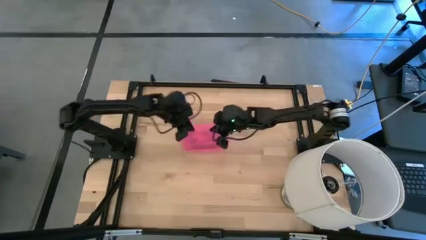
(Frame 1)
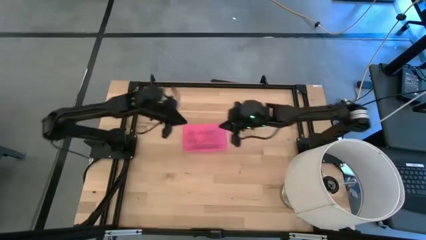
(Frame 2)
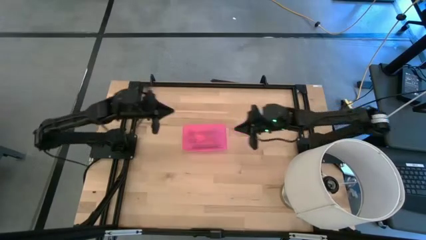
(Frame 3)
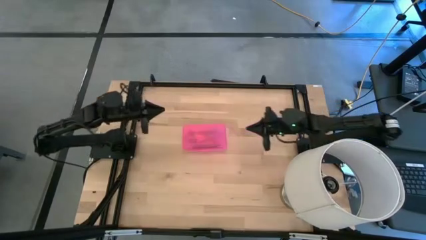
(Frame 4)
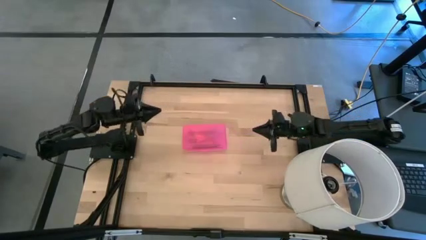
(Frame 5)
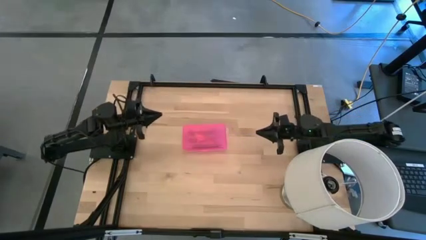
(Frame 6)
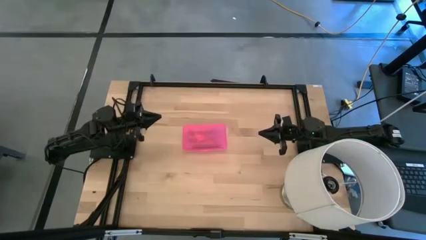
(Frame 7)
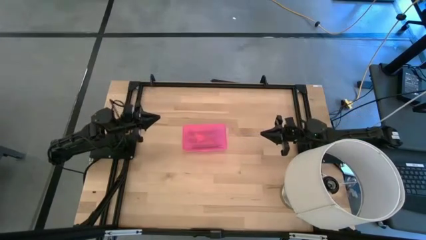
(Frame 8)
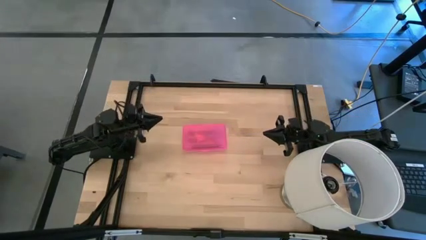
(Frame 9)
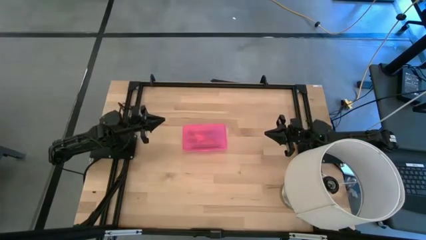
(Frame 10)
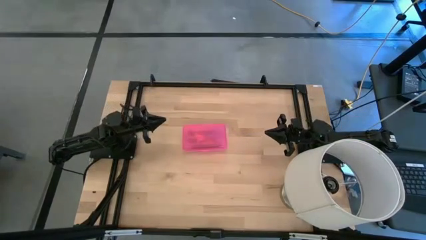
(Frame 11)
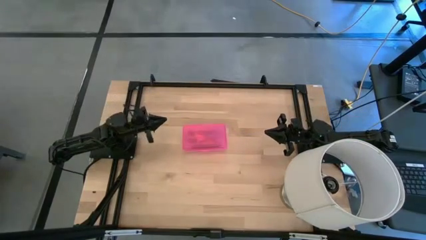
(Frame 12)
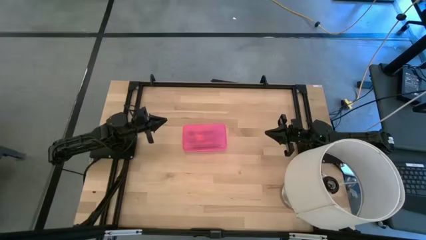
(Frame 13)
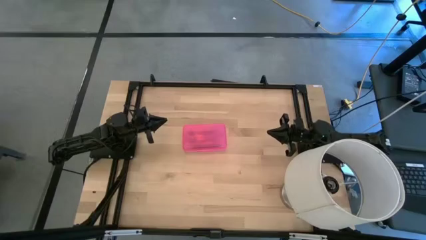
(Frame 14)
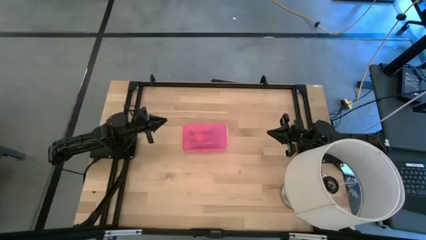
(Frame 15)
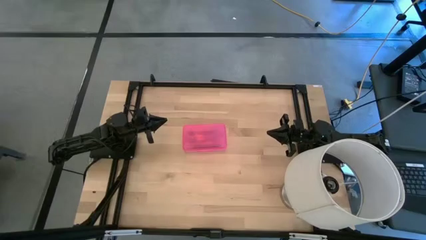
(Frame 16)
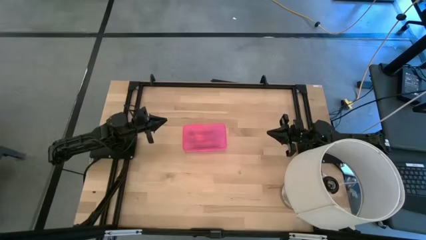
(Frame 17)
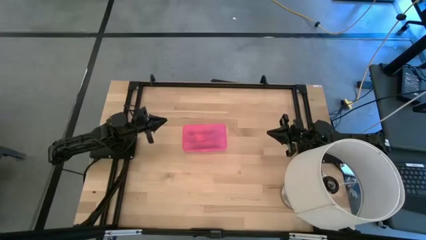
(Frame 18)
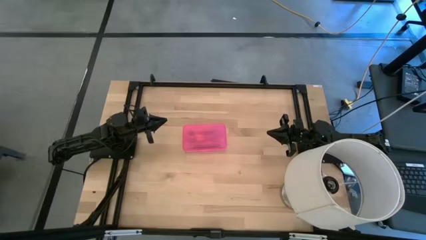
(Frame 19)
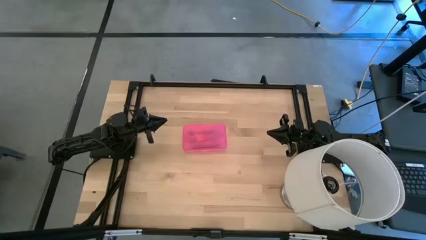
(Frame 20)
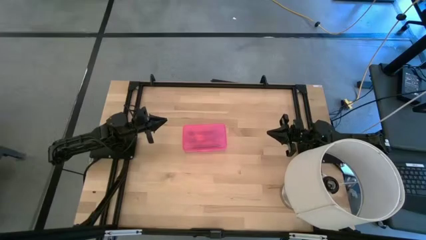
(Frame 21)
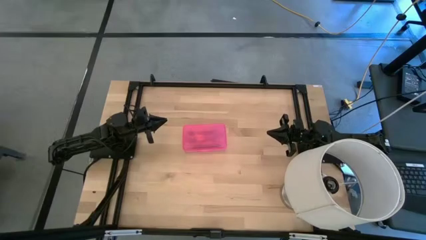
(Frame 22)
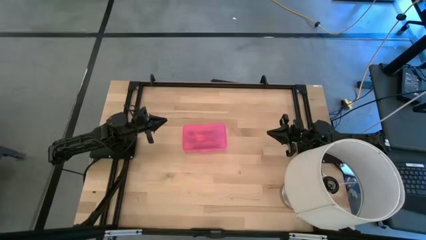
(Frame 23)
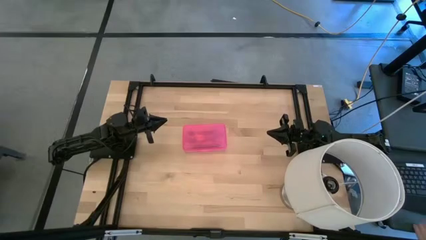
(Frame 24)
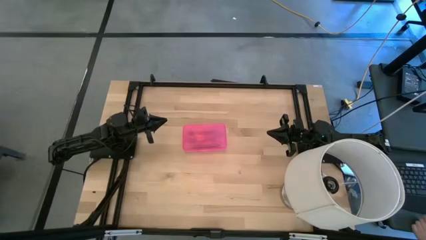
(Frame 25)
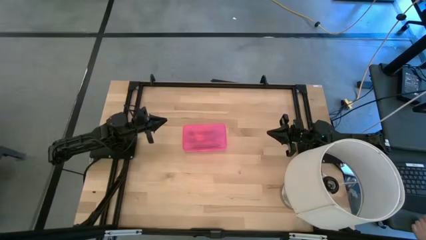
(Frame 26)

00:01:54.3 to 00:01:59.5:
Task: Pick & place school supplies into a supply box
Return to Home Position

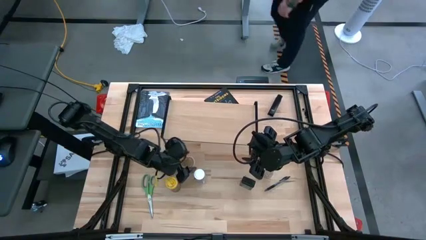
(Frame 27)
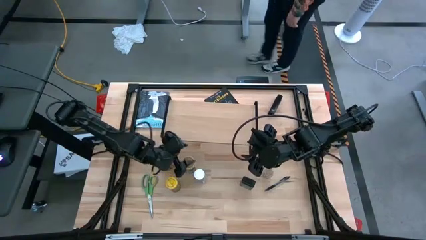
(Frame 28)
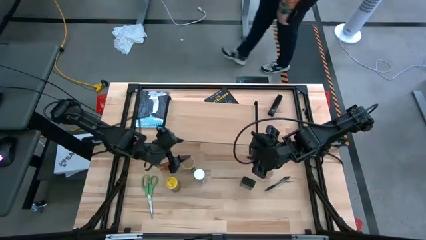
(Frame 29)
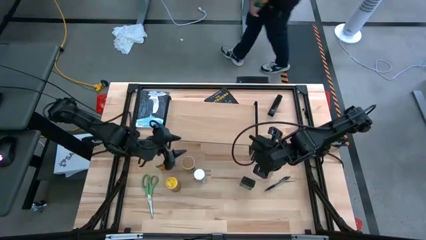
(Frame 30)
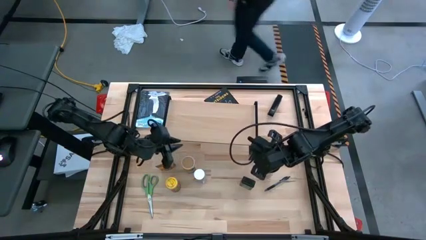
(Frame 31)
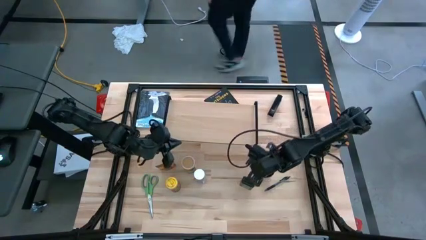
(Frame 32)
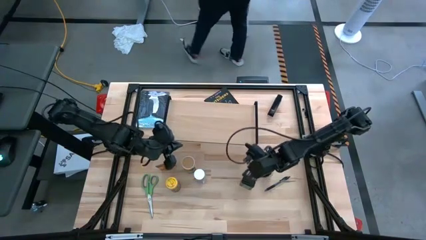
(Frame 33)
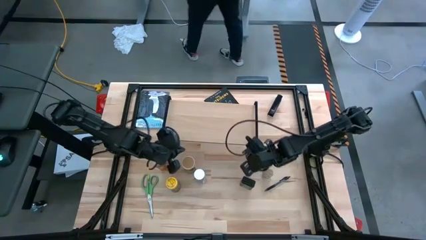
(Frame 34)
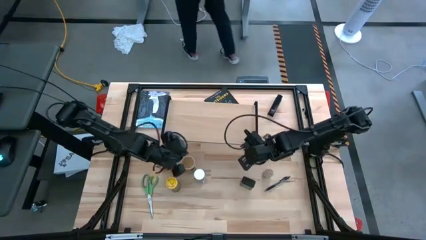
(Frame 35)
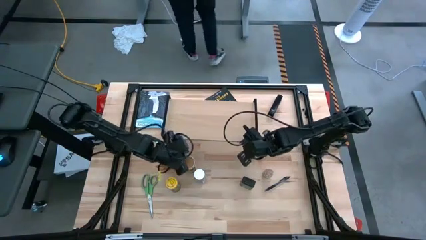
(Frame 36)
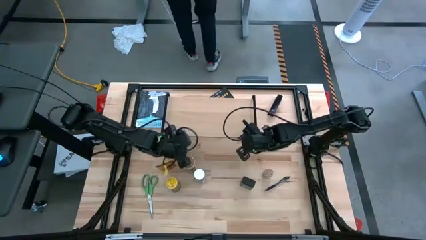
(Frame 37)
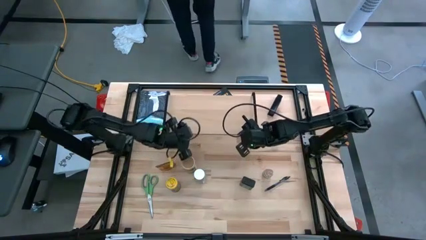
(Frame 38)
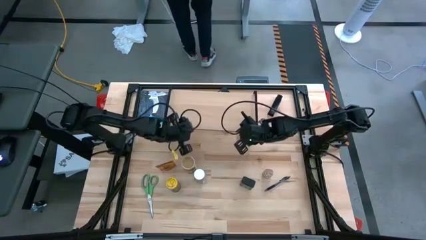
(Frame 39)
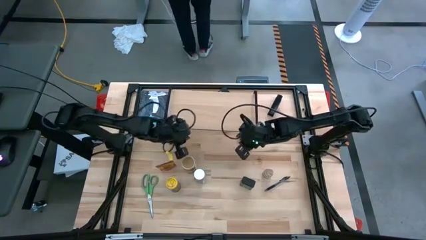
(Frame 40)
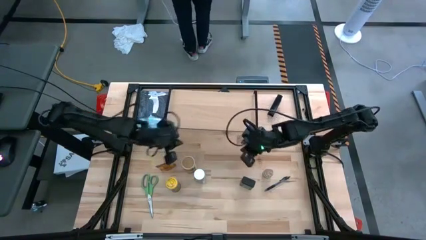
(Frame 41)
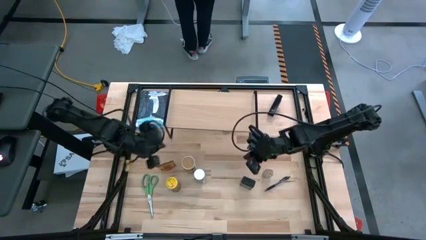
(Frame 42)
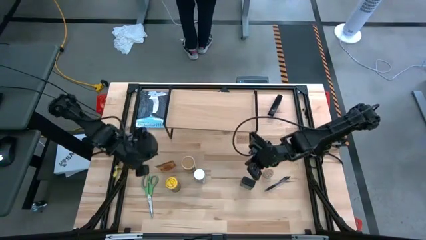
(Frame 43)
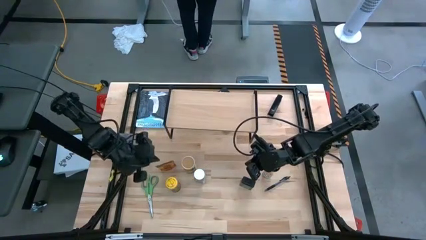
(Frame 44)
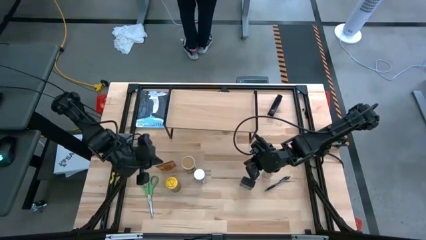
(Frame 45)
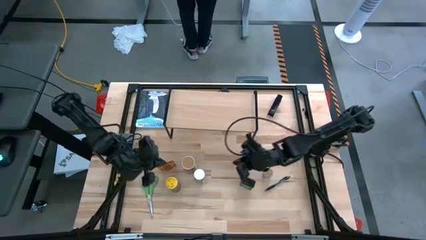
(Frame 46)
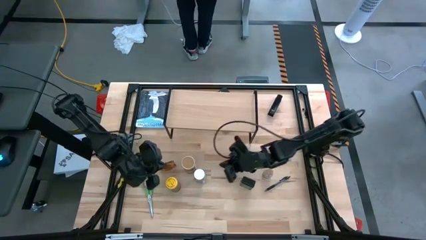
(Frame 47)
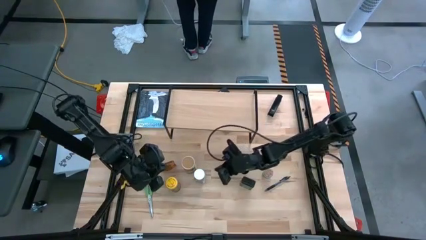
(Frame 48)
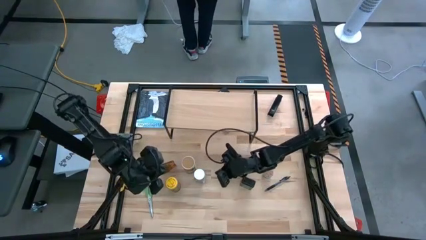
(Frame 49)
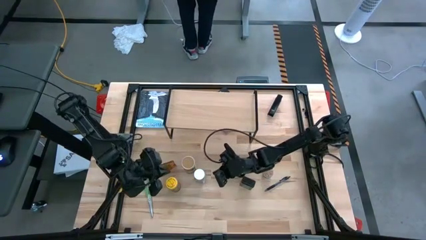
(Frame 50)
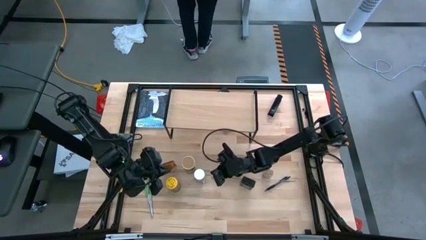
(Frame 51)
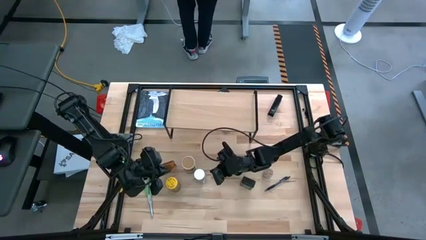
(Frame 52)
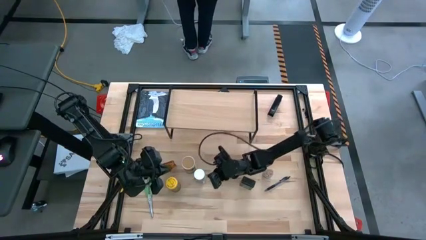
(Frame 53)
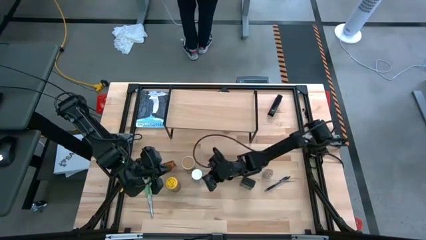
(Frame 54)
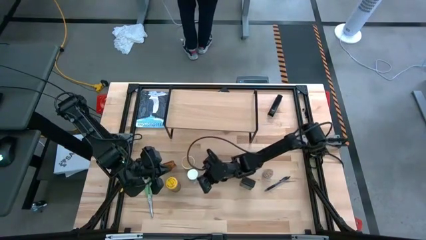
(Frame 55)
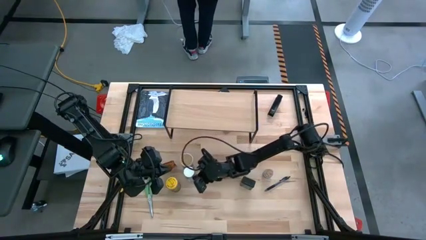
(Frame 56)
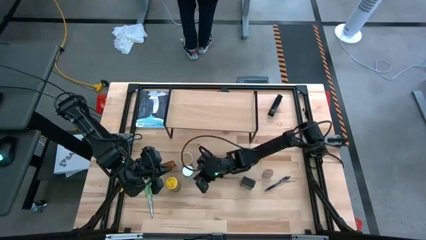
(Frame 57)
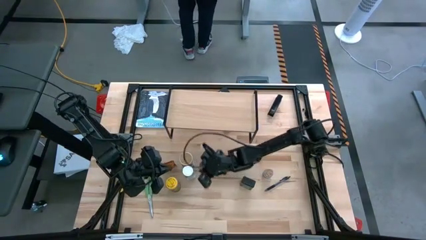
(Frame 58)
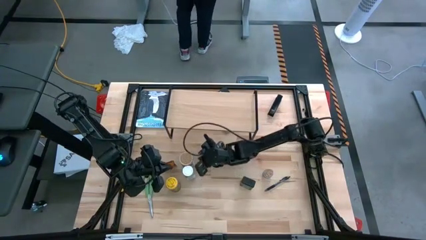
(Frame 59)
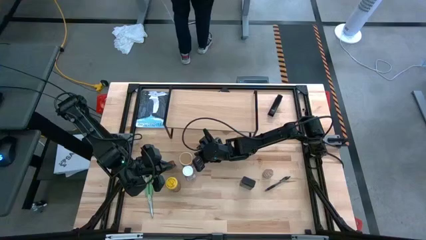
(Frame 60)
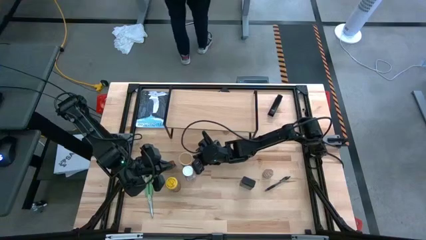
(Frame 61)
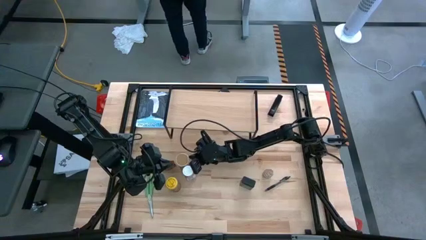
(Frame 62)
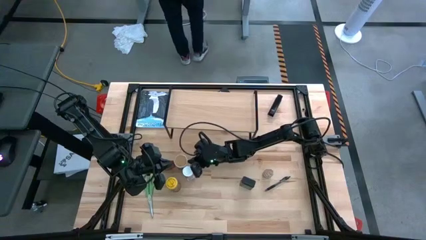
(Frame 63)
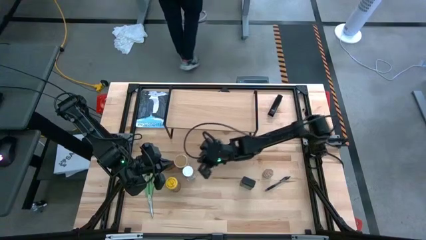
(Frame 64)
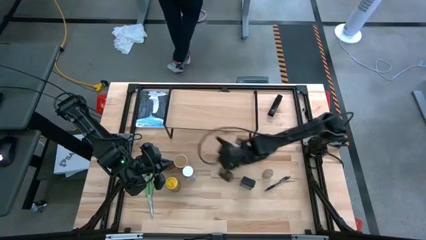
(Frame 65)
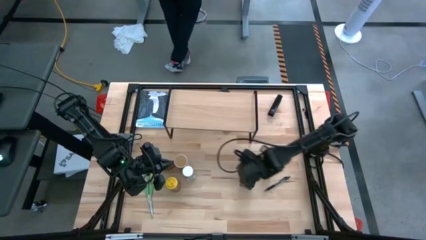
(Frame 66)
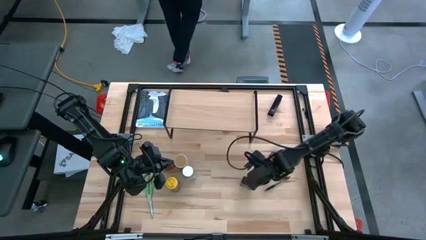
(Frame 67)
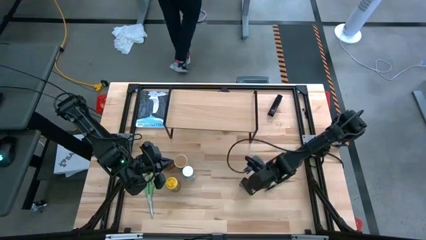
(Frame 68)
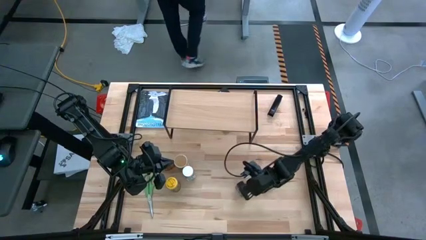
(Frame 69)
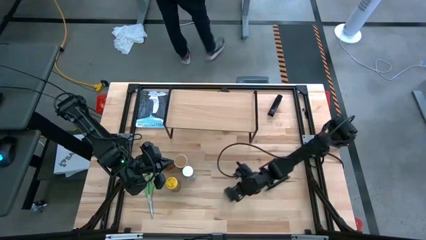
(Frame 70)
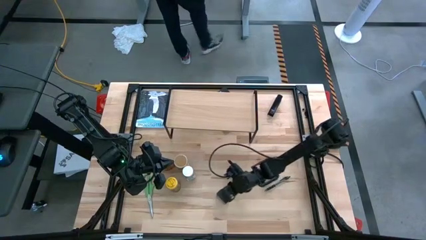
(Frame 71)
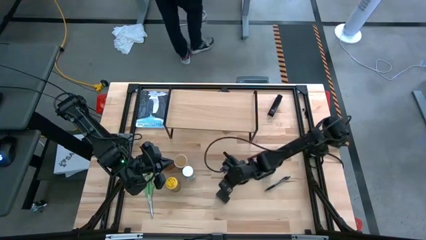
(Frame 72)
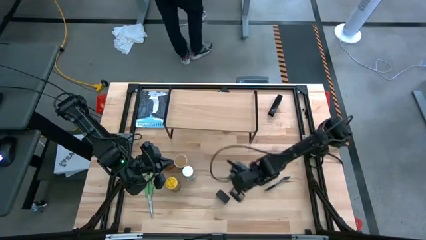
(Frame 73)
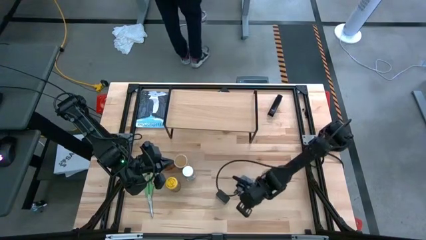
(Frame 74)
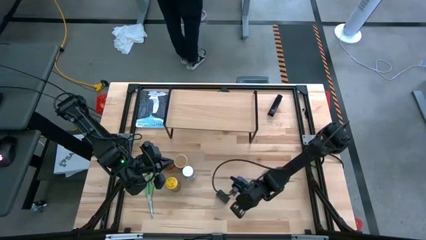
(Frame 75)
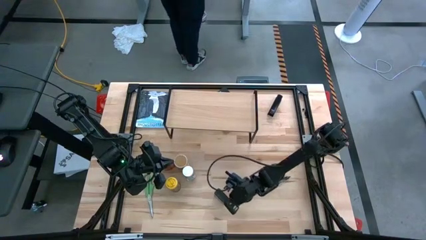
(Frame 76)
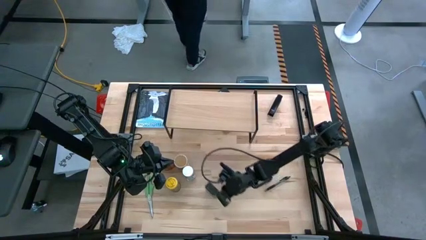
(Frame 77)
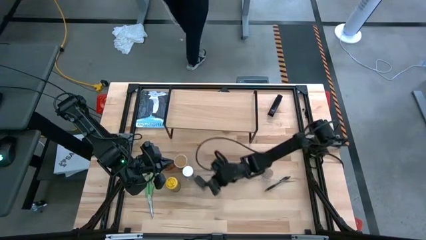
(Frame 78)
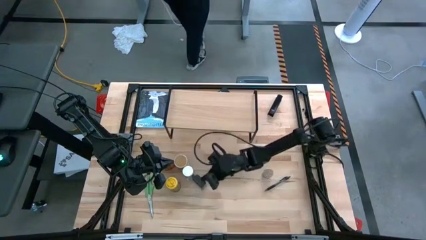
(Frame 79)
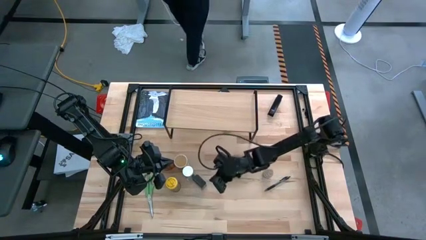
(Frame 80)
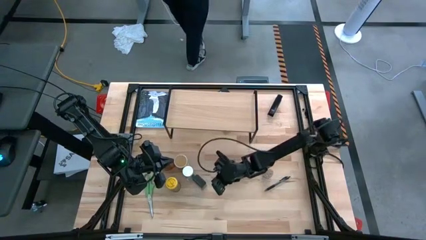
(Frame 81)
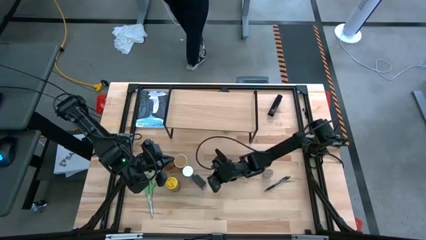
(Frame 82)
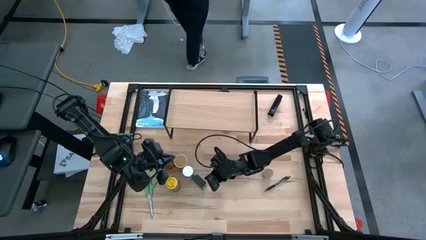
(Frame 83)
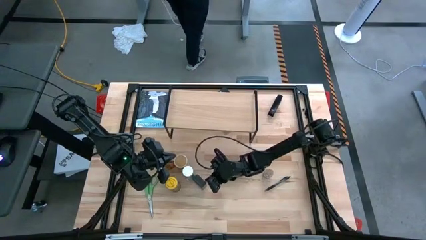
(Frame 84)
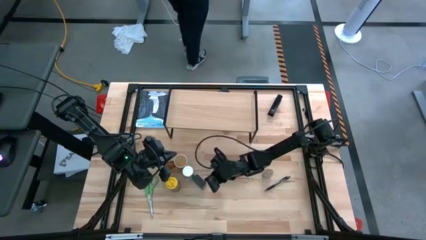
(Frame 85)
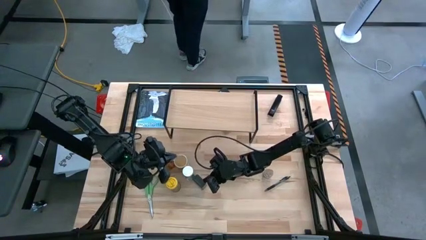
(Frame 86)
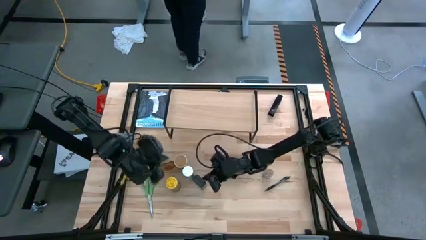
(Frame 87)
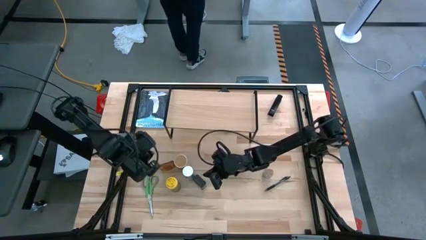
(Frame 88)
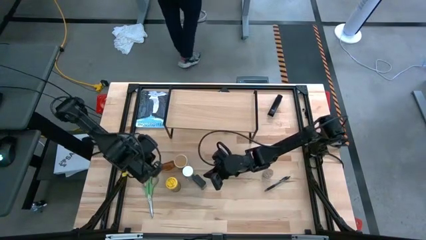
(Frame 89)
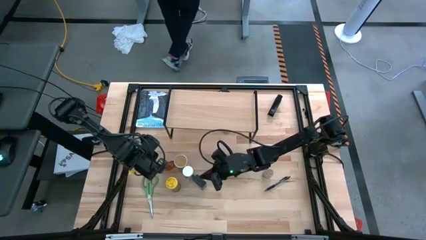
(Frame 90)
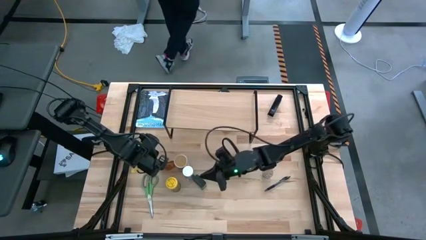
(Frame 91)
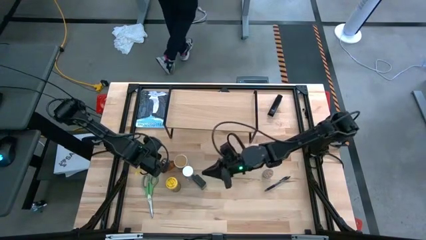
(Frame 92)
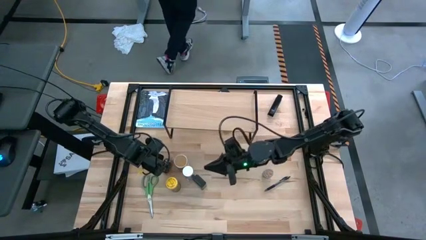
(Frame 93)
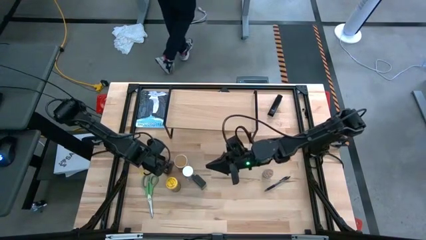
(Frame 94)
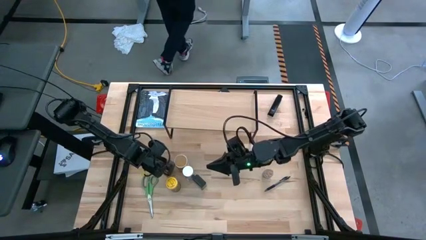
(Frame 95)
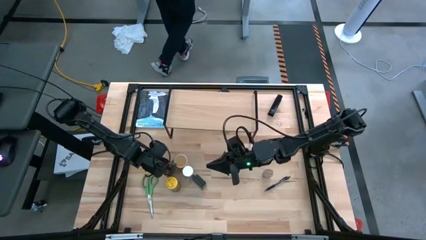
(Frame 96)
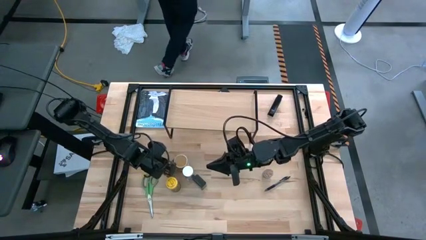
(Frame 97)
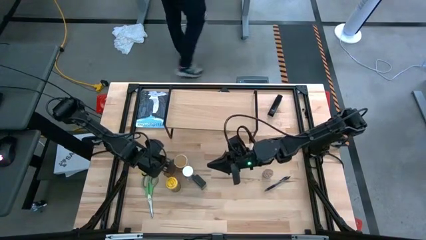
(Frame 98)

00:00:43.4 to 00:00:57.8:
Task: Shelf spices
Adjust the seasoning bottles, can and pack
